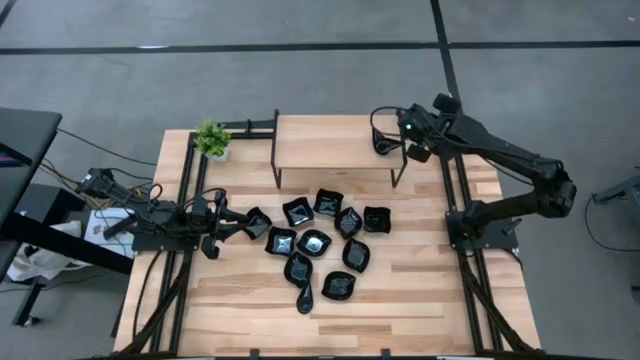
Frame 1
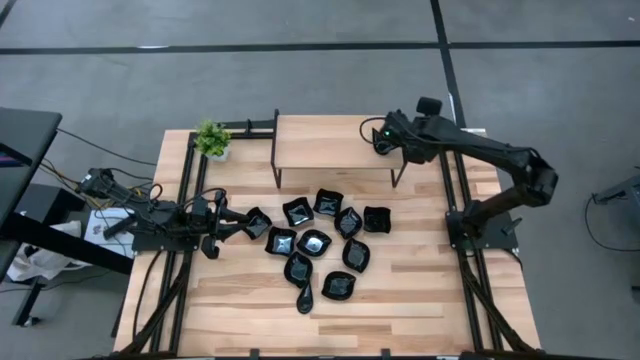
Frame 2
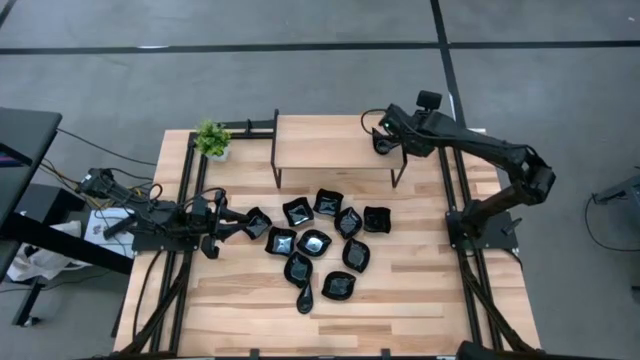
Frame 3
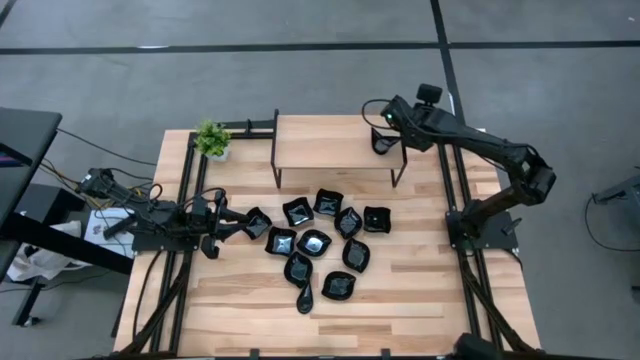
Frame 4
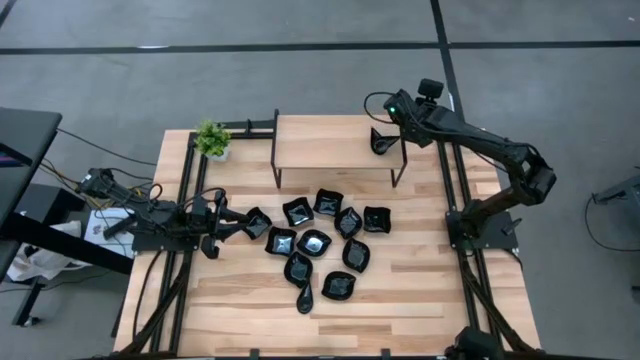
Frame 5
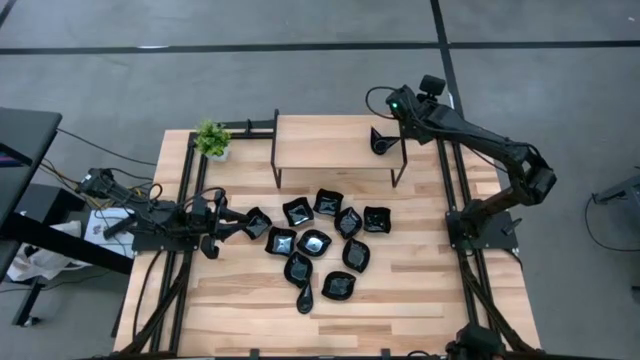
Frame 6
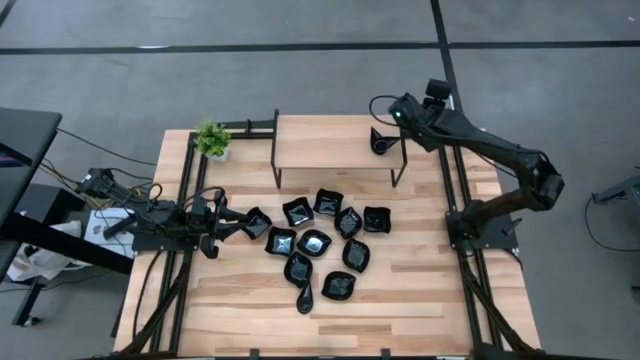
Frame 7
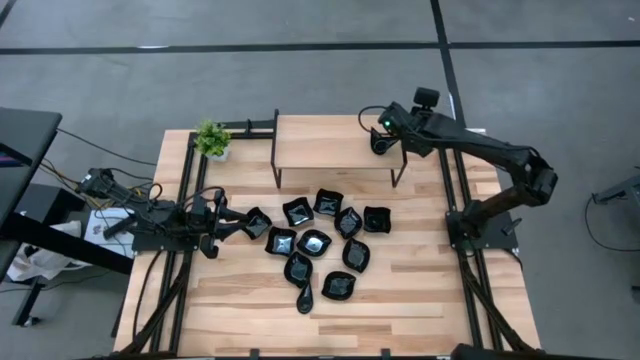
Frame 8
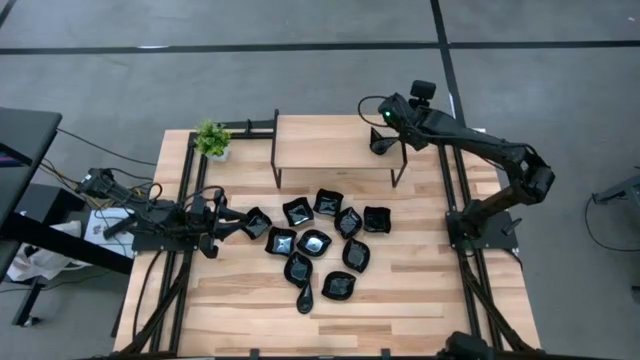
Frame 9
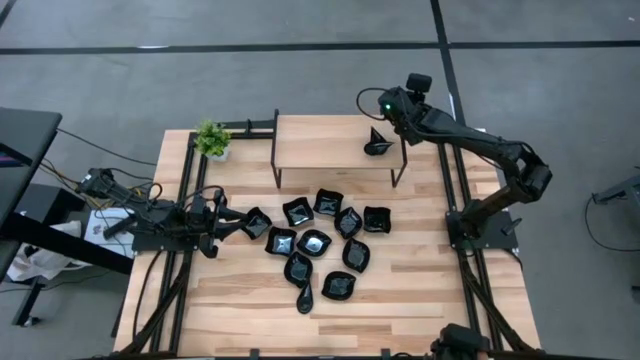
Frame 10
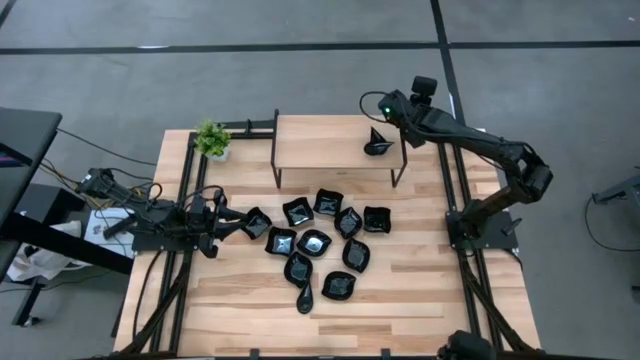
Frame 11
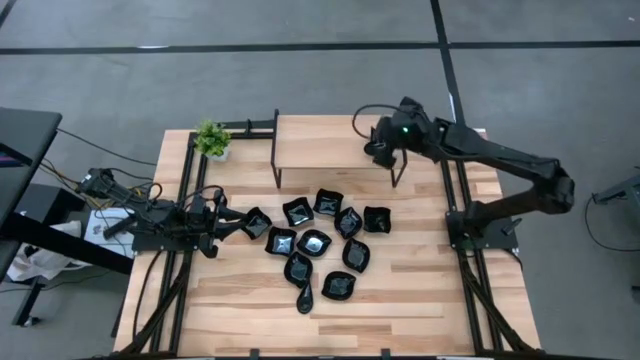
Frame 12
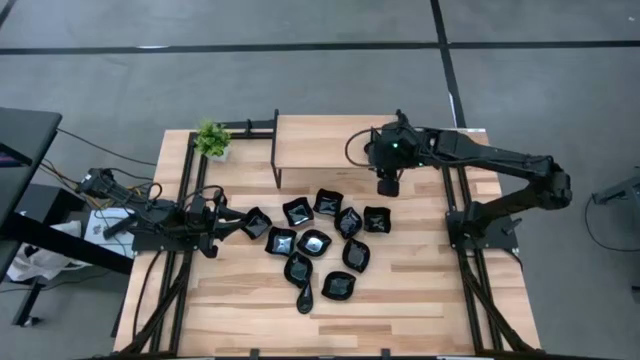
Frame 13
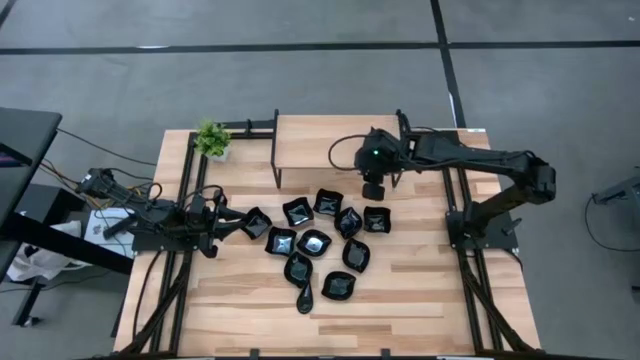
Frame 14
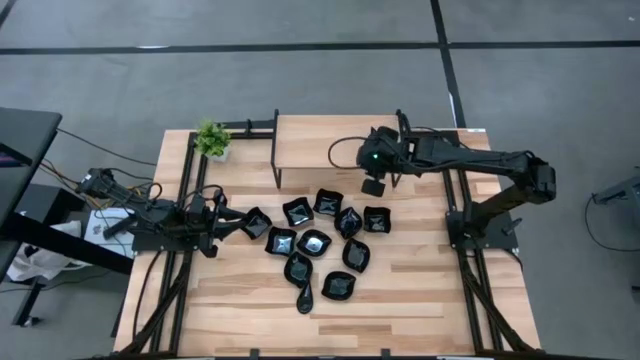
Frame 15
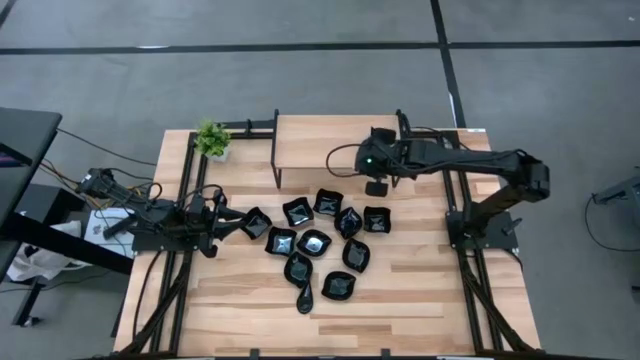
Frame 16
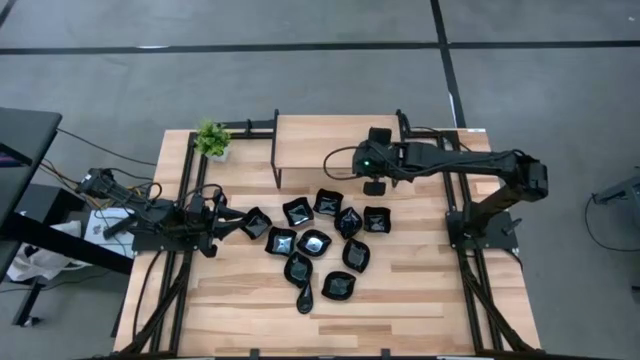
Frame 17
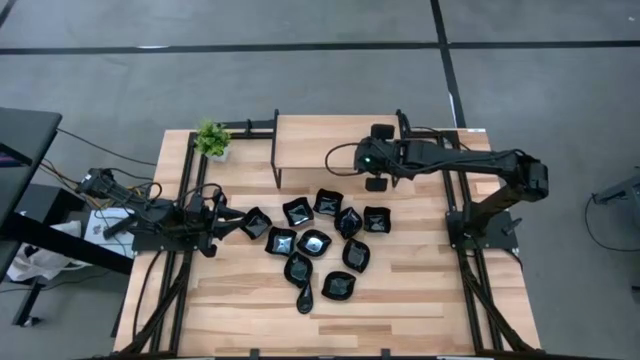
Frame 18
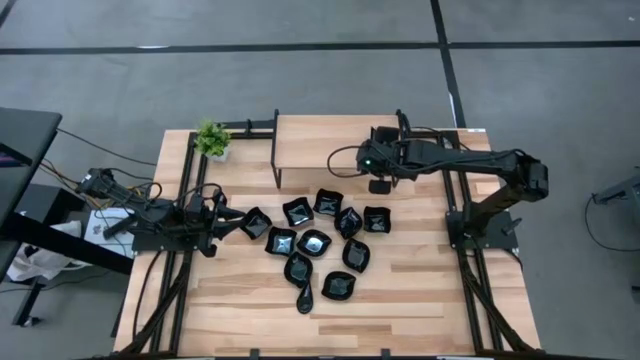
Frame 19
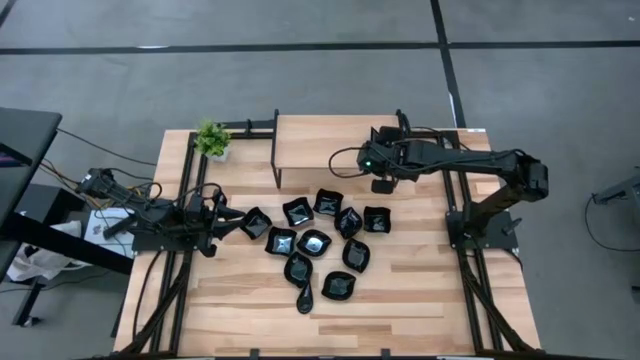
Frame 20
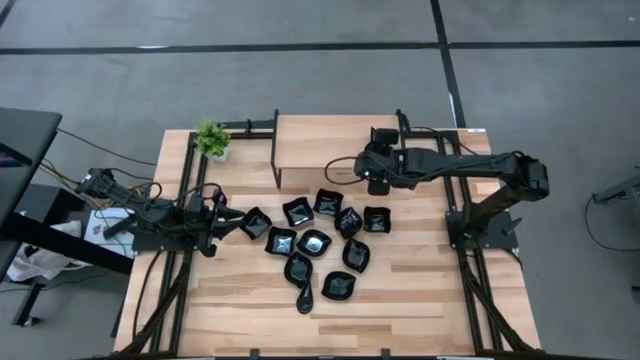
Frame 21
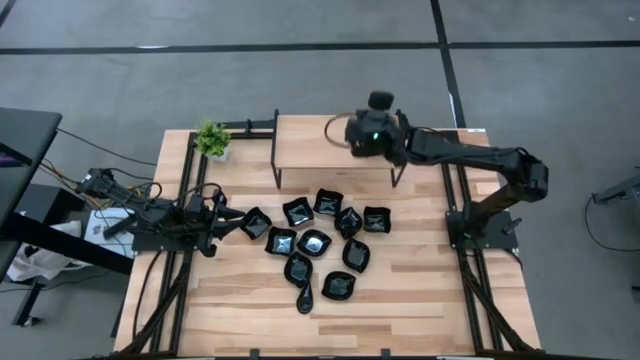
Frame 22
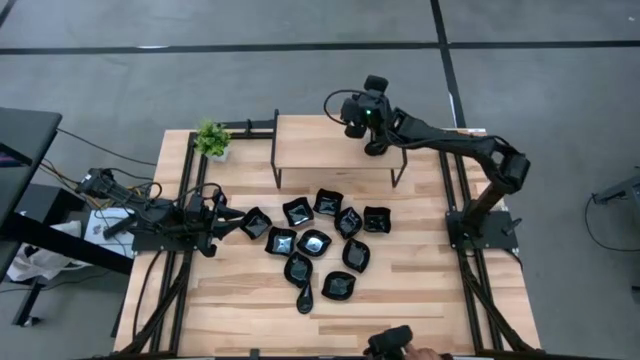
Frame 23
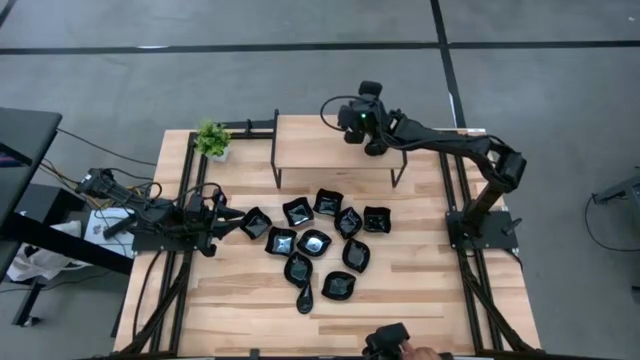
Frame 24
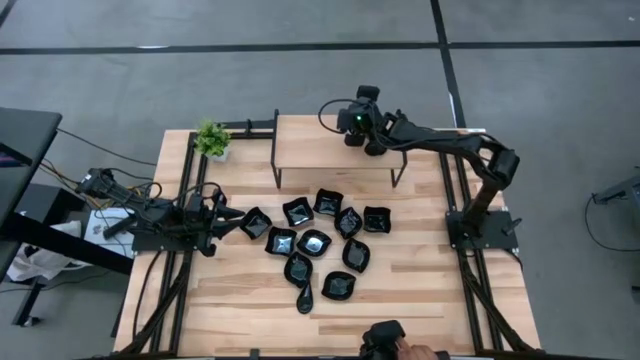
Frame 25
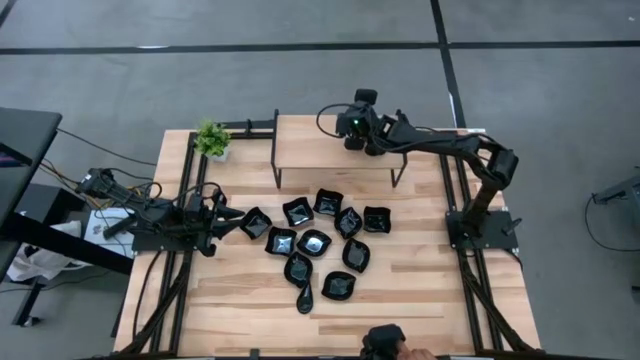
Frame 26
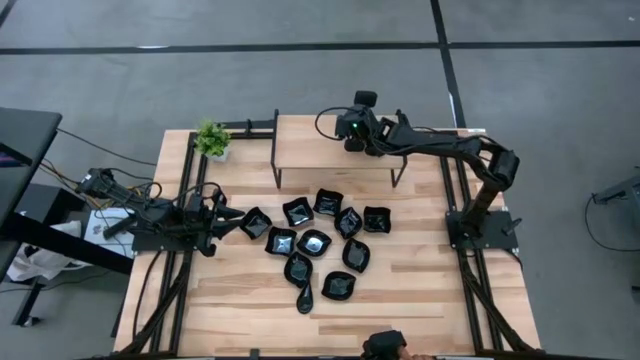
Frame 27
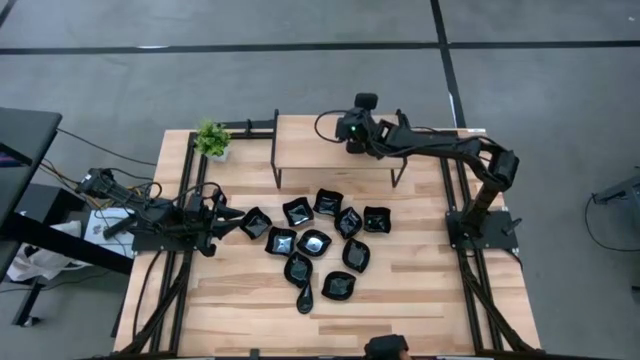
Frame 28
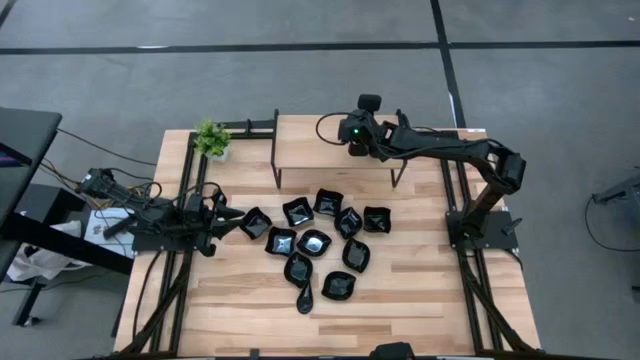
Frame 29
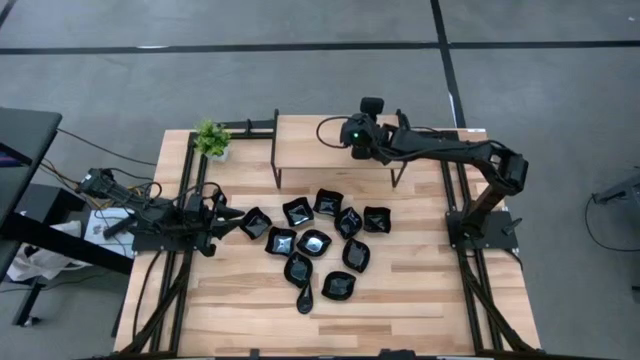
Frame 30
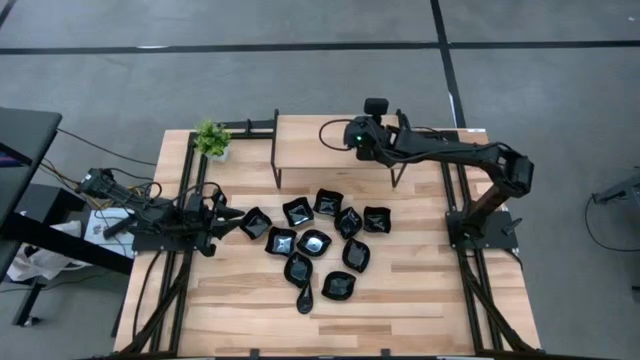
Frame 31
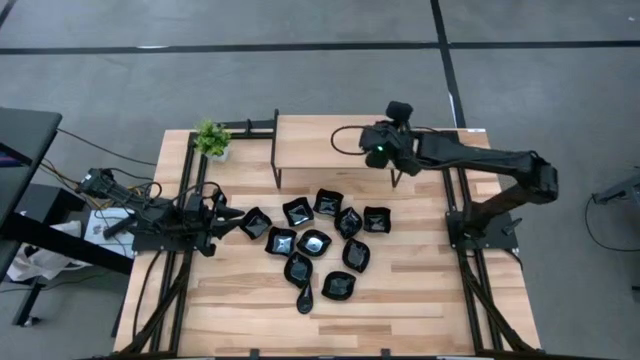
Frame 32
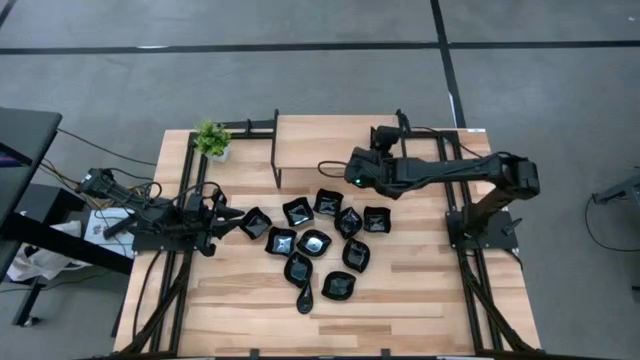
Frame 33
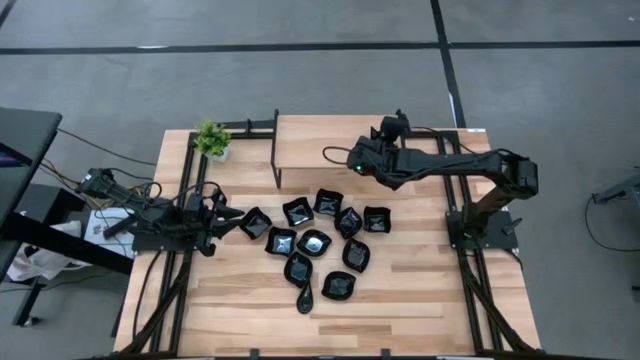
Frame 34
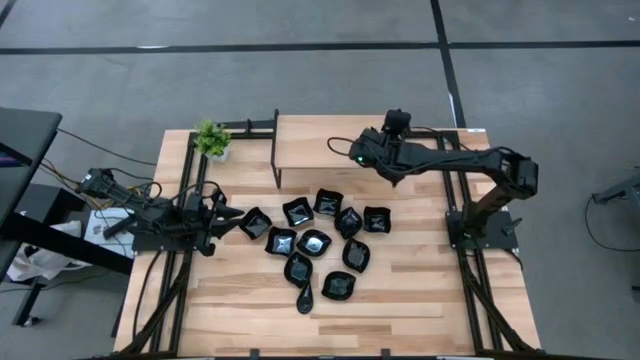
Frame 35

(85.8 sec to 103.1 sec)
Task: Pick & Place Mini shaped plates
Stack the black drop shaped plate on top of the black drop shaped plate on the shelf

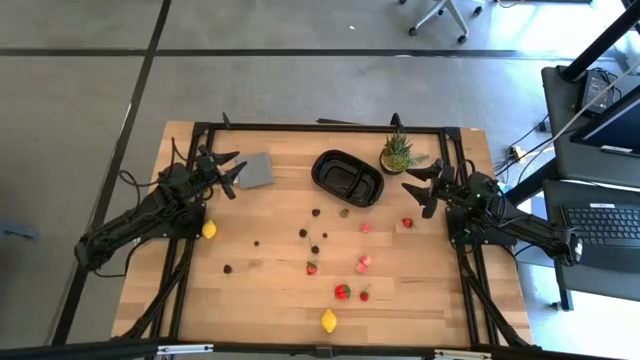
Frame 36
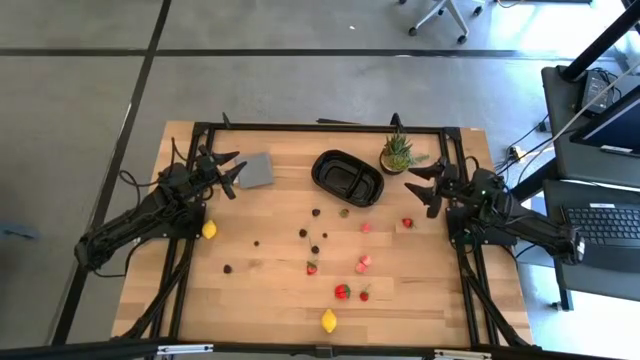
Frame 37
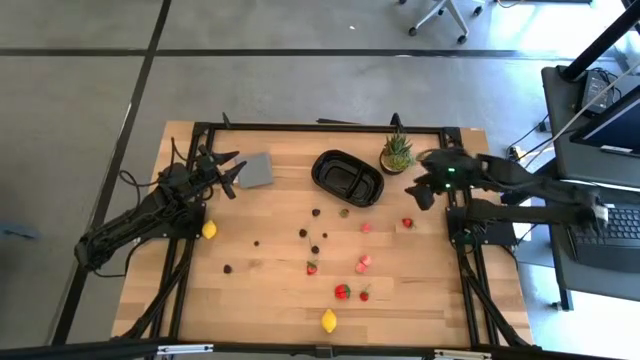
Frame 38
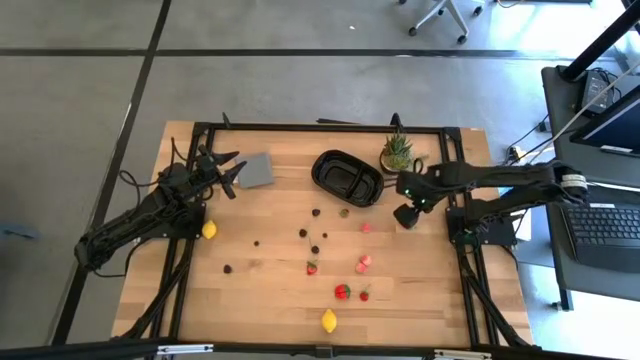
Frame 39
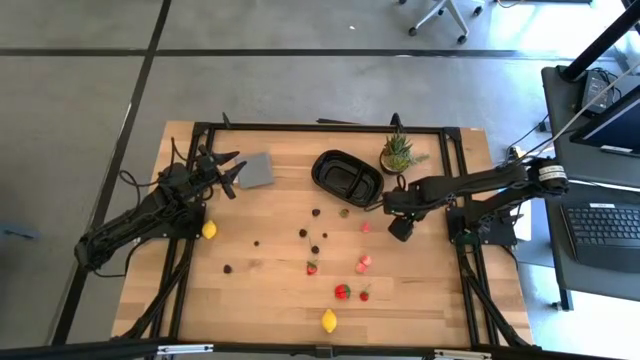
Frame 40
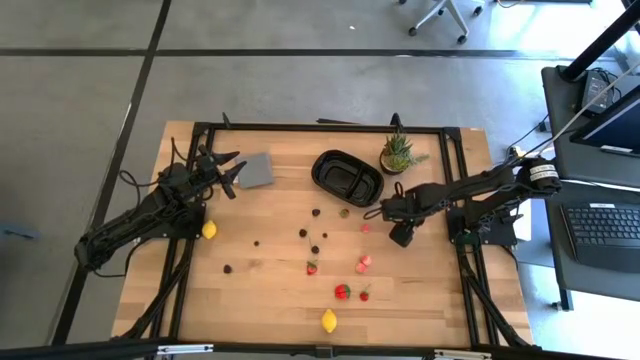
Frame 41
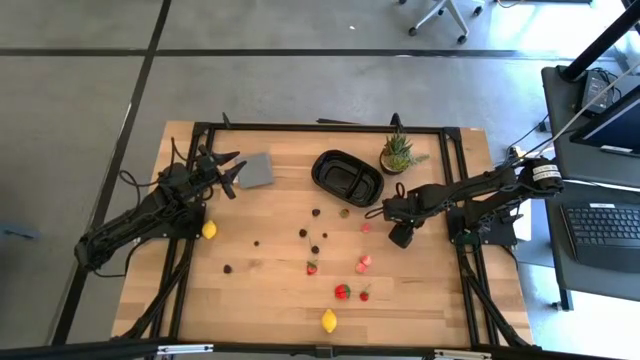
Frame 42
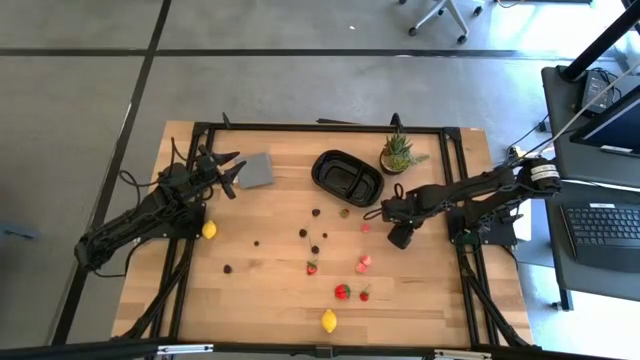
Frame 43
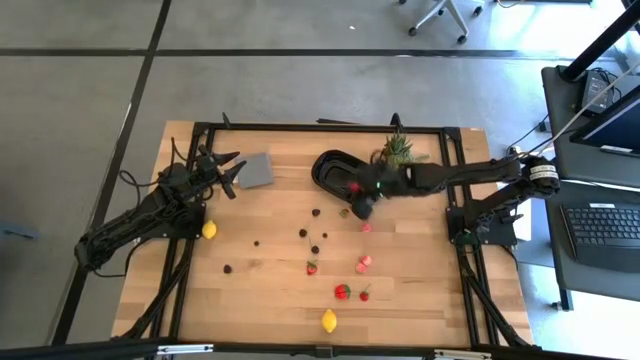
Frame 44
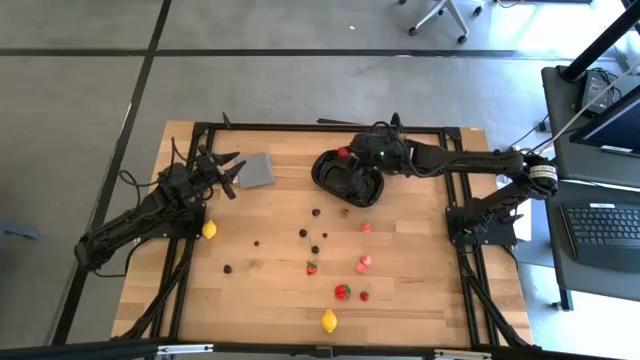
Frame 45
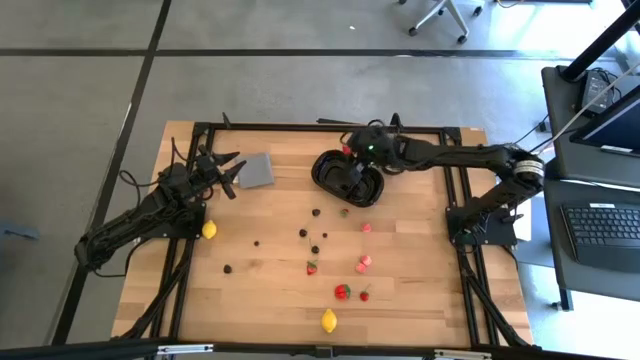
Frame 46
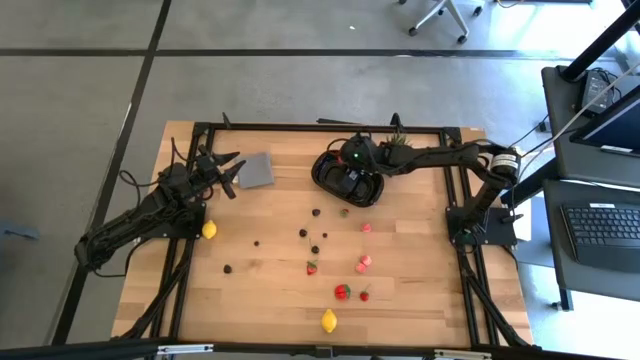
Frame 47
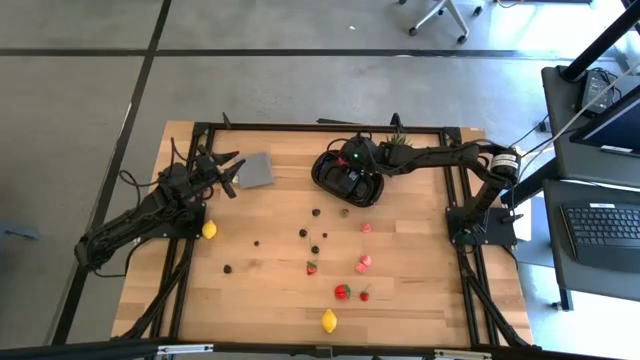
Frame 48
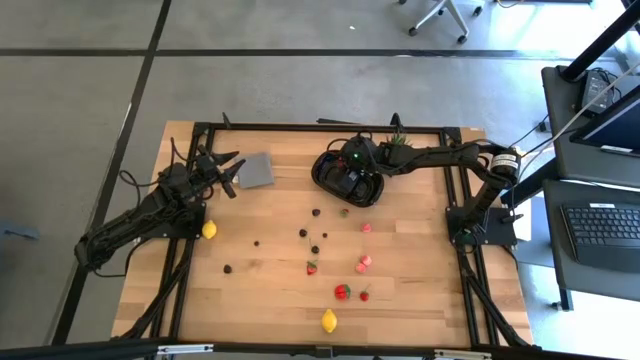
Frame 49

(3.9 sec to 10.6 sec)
Task: Pick and placing Produce into tupperware
Put the strawberry into the black bin
